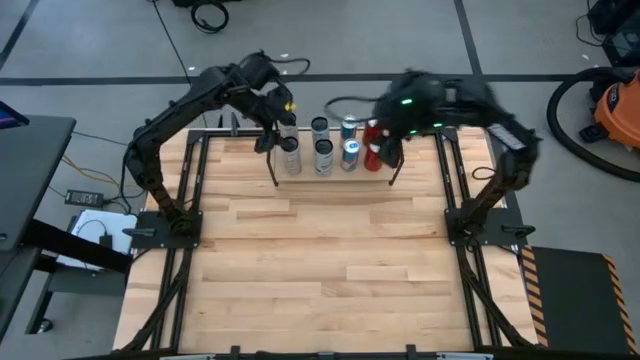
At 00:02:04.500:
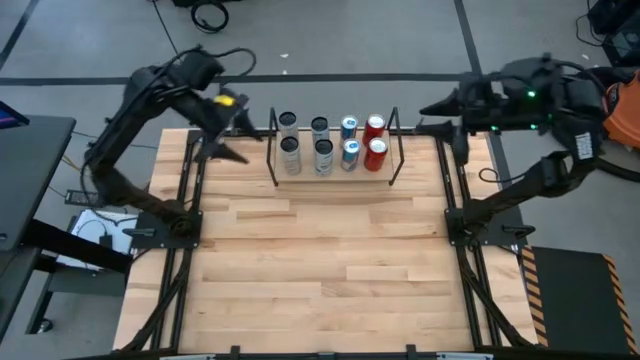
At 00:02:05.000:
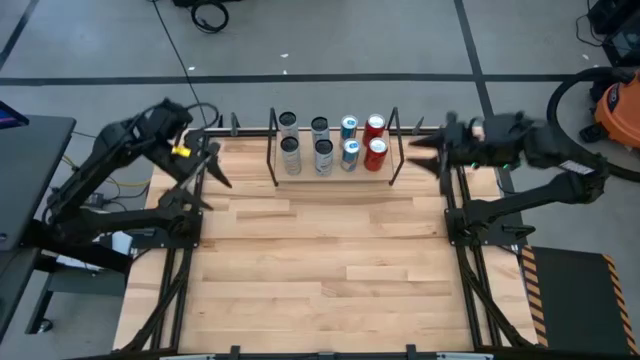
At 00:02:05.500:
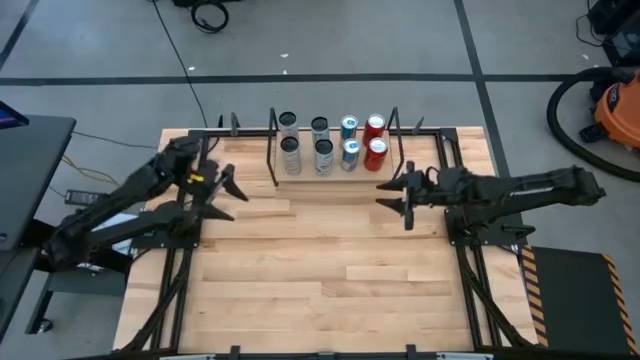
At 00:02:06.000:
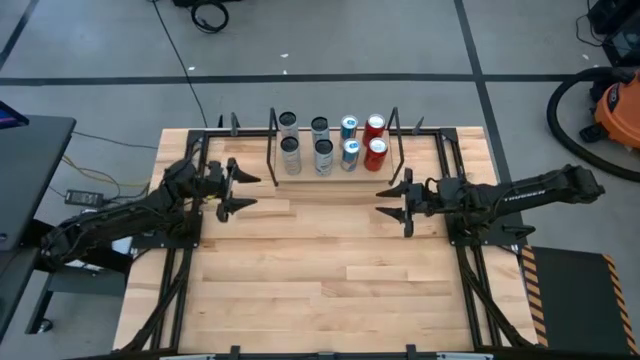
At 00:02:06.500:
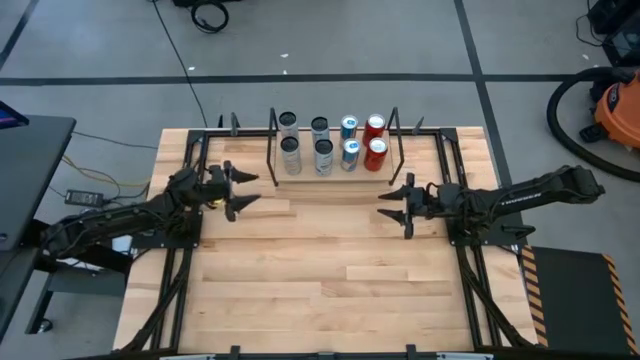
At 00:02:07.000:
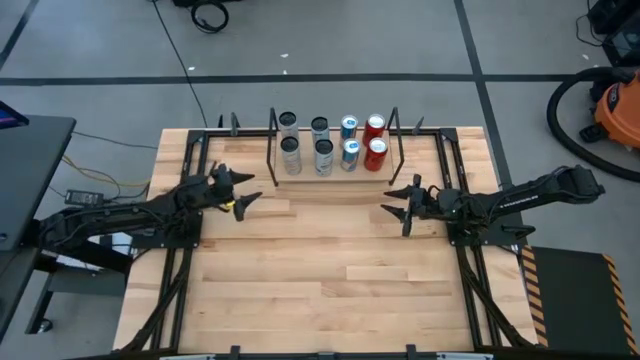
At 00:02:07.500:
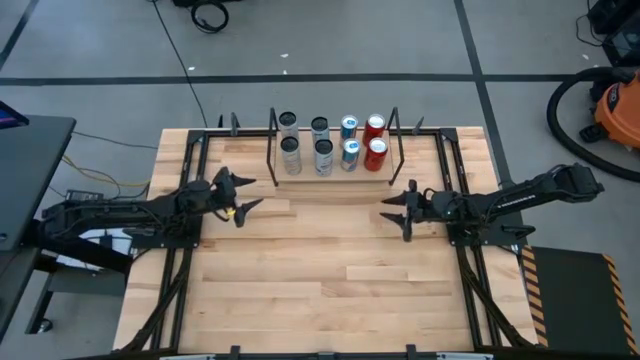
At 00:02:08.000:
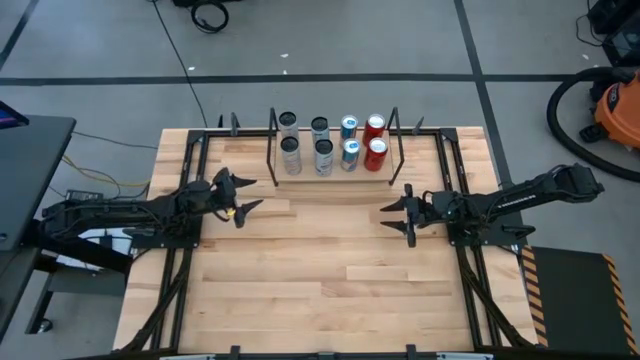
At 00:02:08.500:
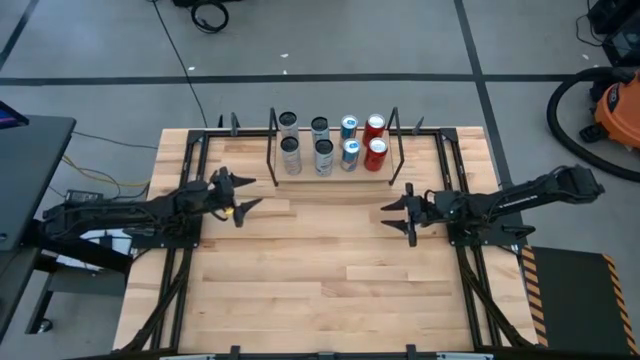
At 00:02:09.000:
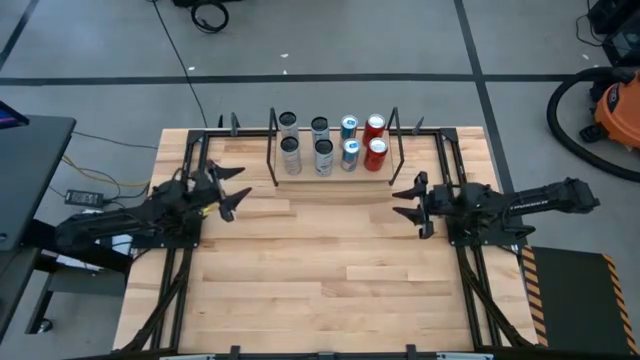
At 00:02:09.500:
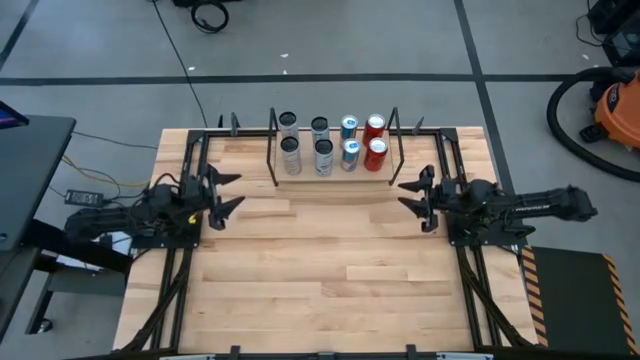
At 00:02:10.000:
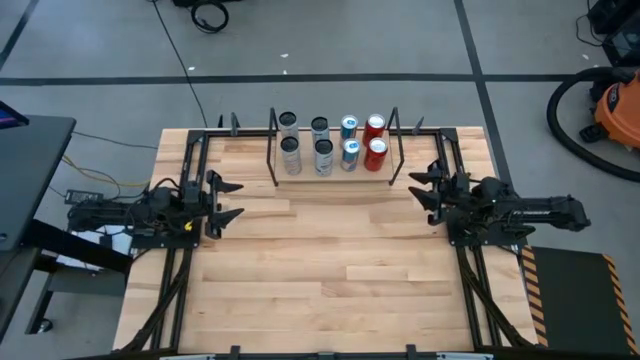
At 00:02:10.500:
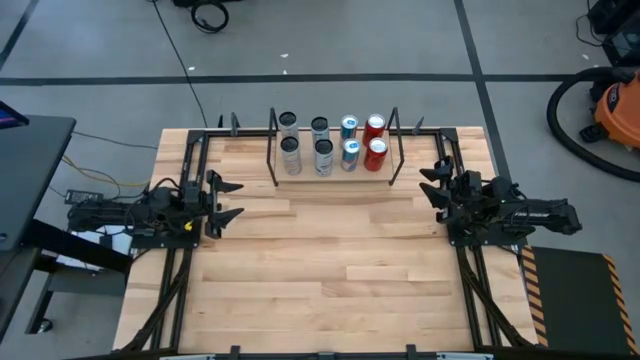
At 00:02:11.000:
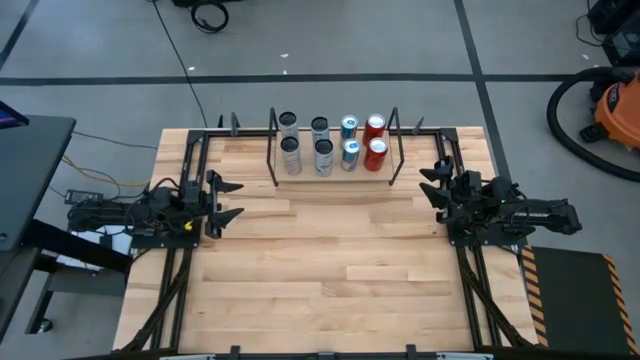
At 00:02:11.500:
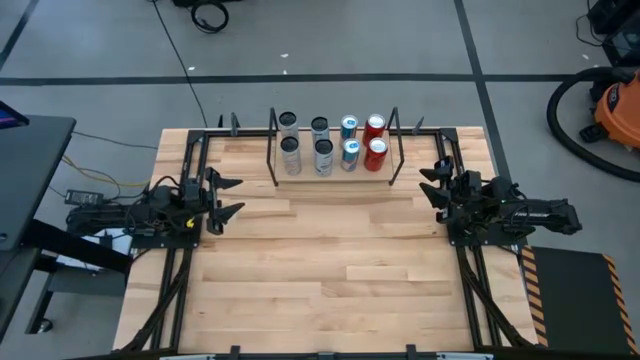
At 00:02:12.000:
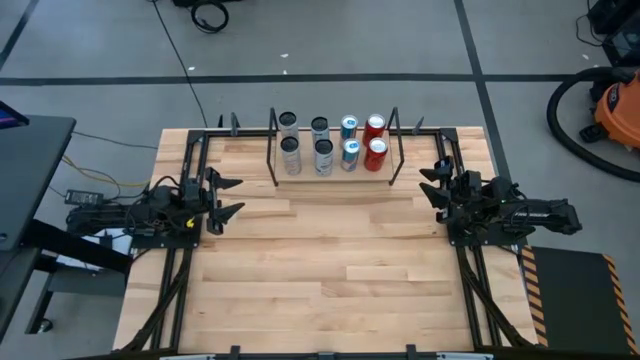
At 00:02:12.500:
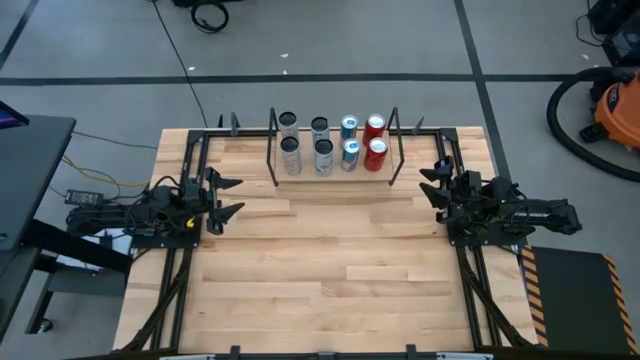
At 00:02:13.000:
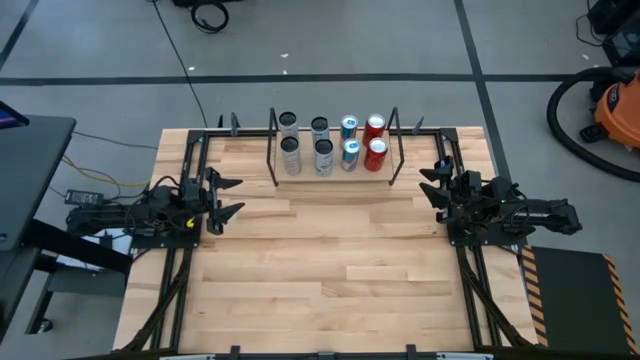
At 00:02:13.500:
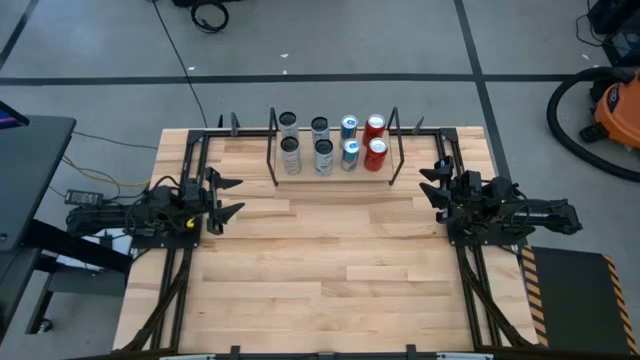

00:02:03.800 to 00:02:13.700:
Task: Place canned beverage on shelf
Return to Home Position

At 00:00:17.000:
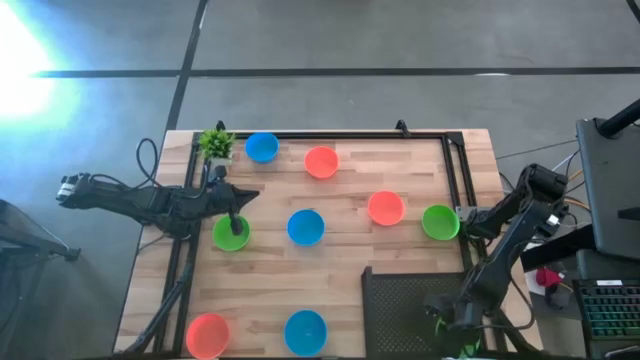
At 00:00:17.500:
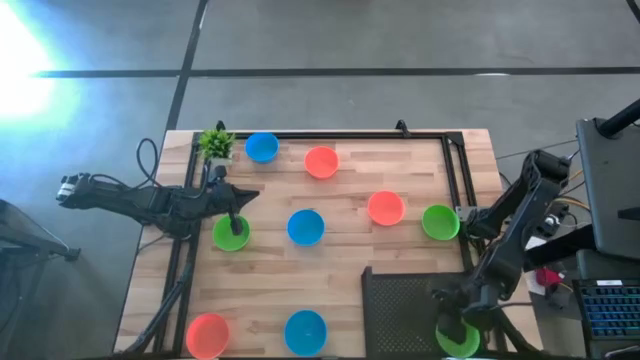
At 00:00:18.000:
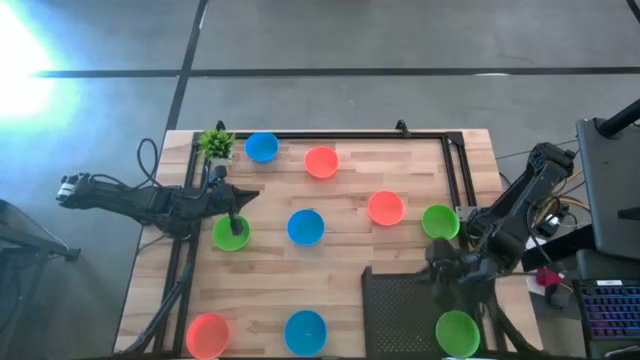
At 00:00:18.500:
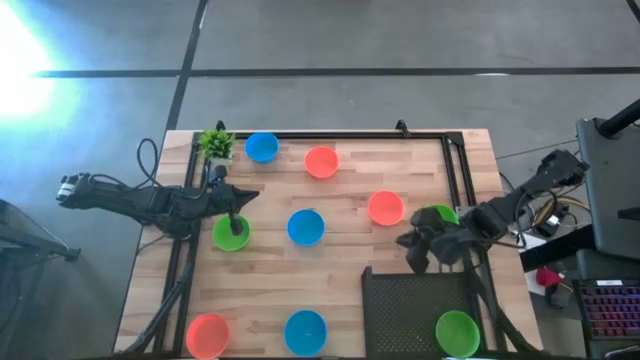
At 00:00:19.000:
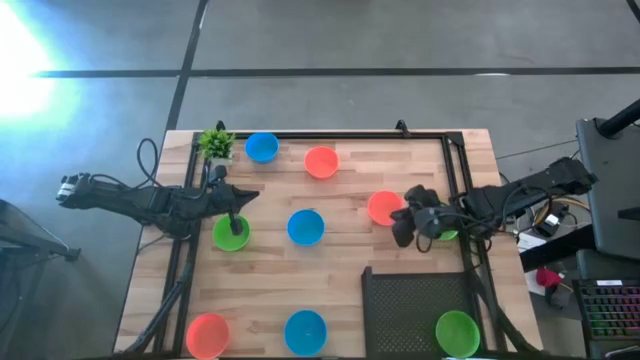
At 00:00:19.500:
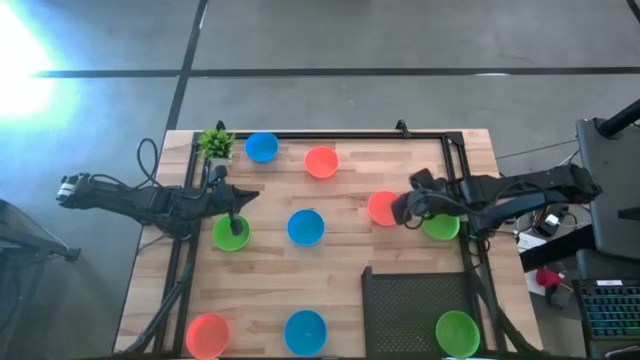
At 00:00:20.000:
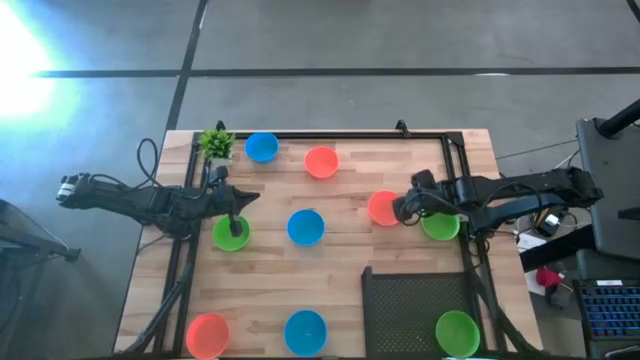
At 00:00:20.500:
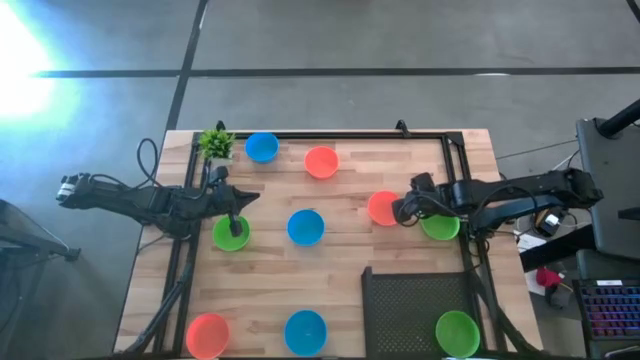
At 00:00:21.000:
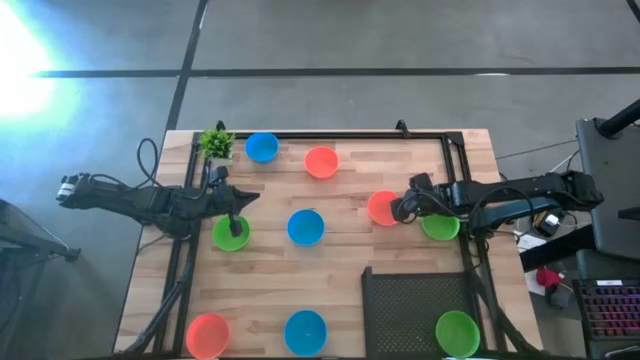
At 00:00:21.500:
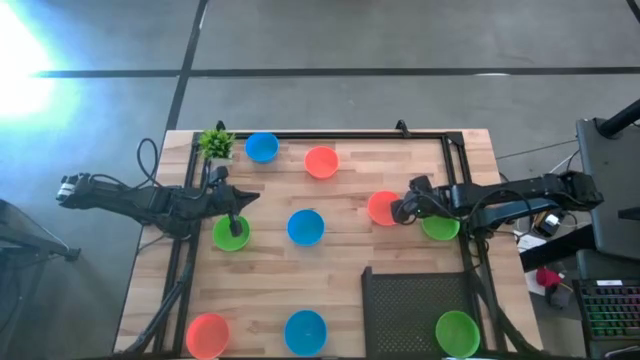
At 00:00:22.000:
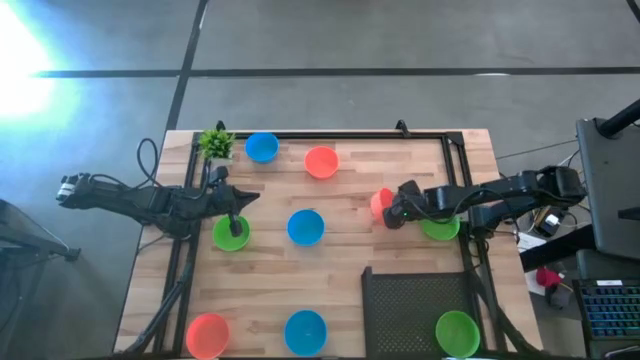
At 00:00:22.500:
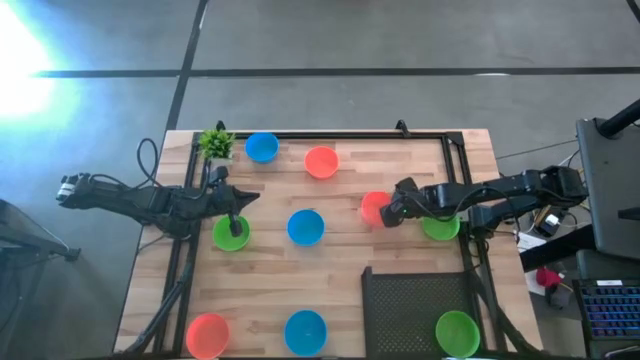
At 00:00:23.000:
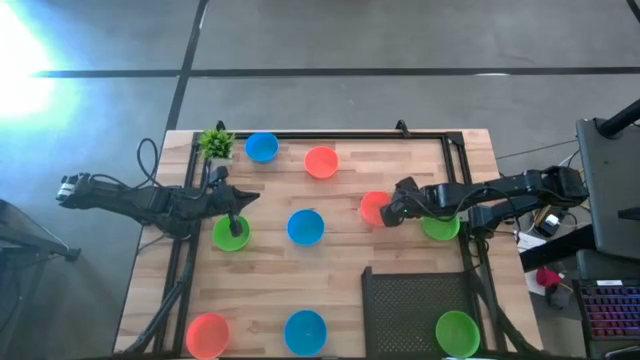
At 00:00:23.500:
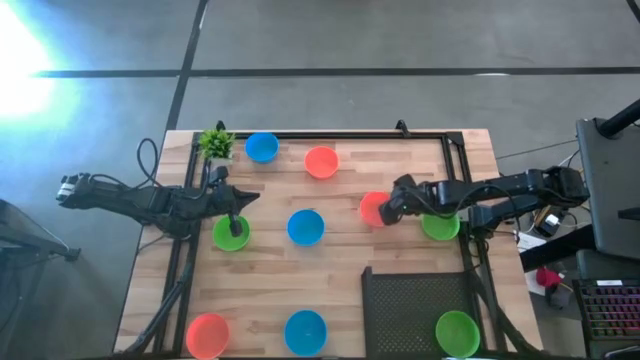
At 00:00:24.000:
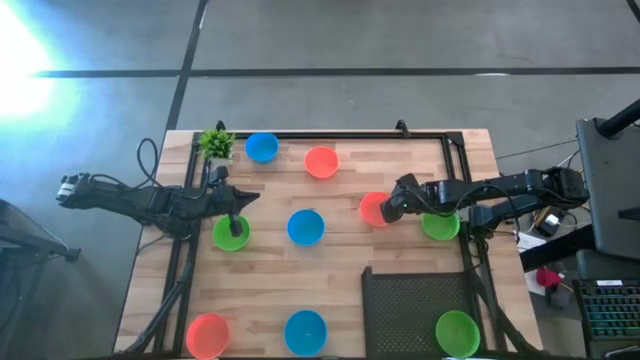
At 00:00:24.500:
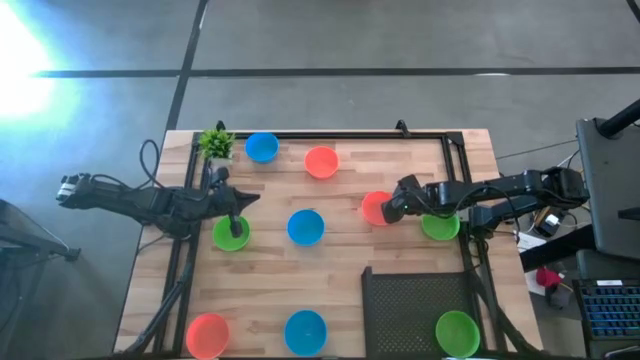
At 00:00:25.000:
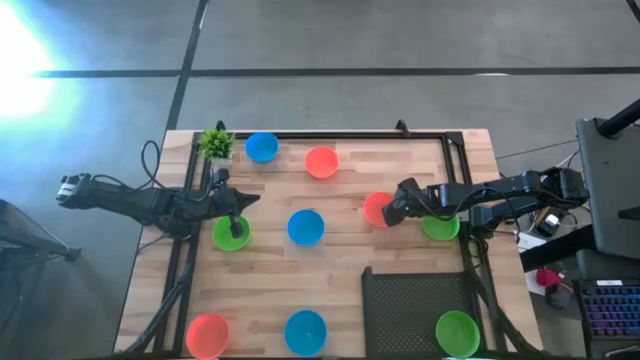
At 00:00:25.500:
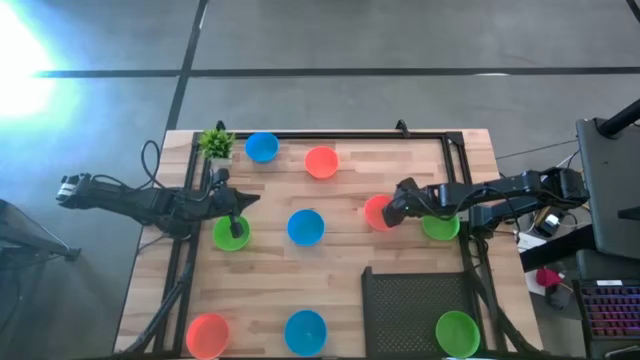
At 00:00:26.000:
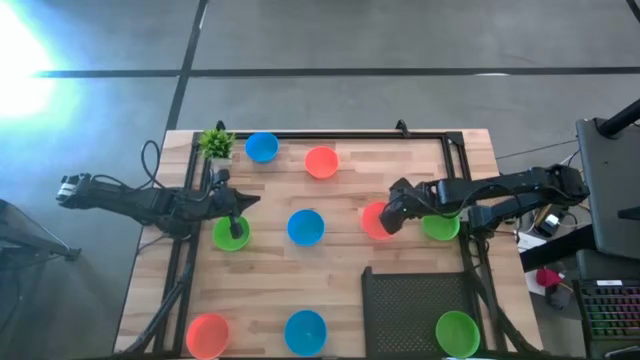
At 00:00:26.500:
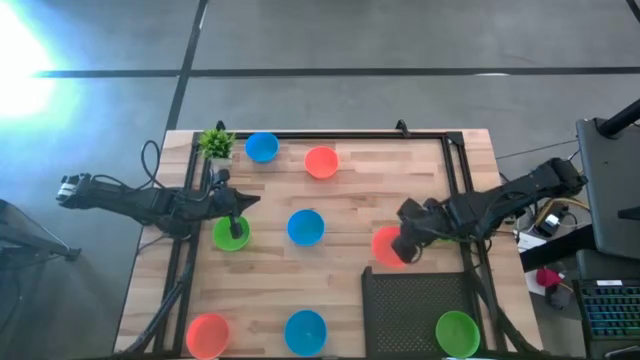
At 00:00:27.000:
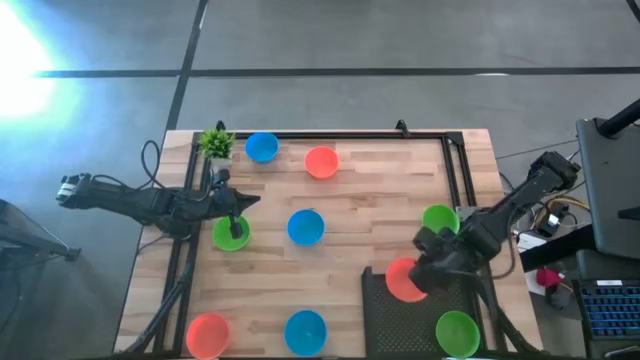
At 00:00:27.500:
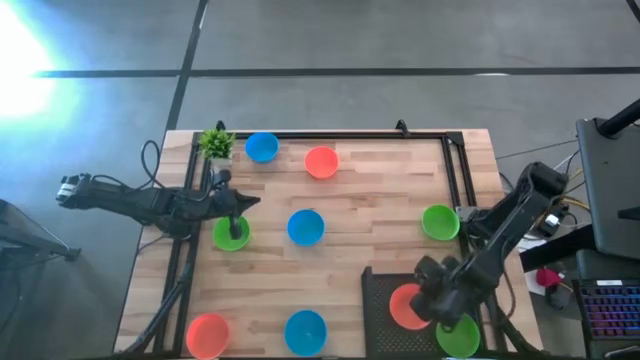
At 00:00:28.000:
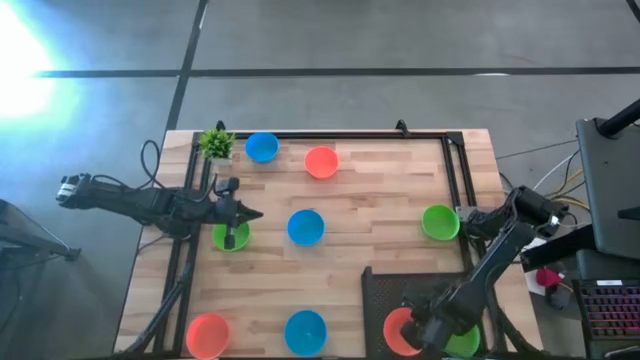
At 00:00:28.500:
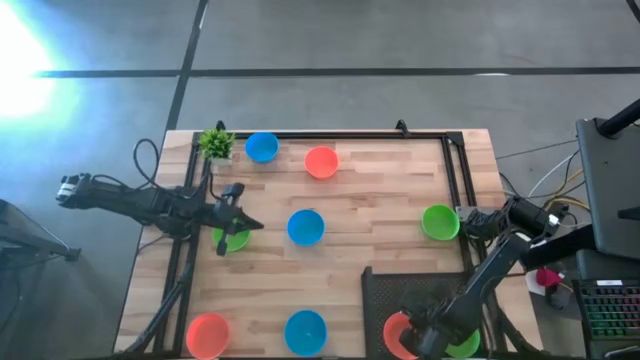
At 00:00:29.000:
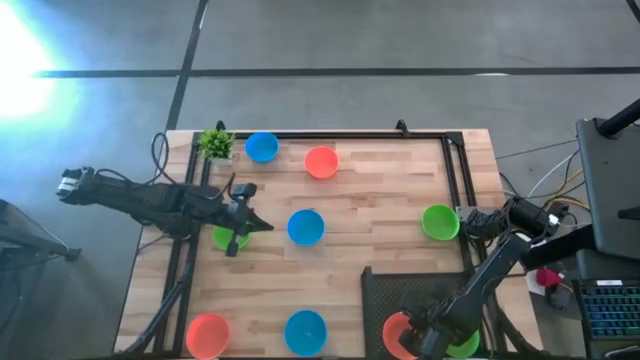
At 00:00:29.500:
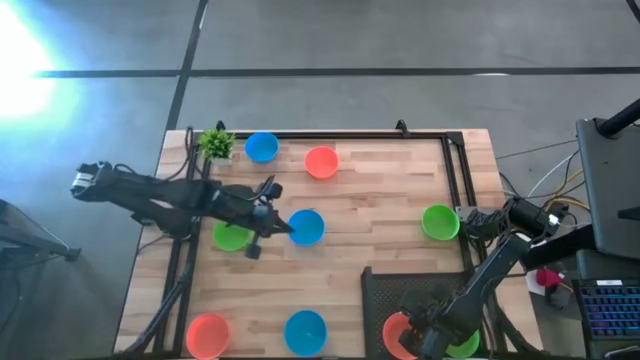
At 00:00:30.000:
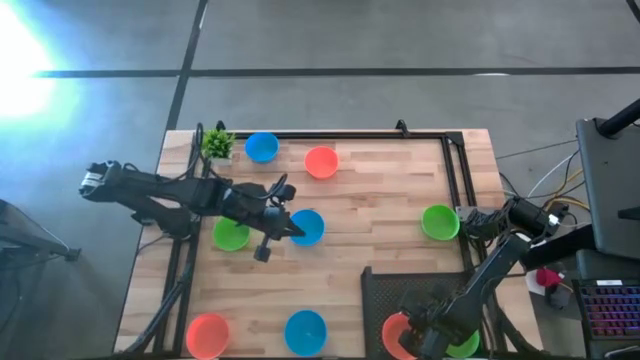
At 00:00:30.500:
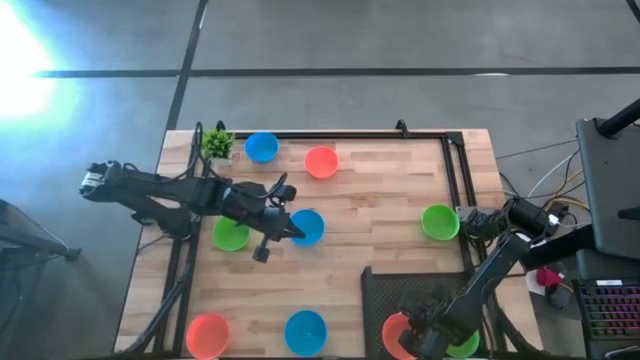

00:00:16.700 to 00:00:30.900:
Task: Pick & Place Mini bowls
Put the top right orange bowl on the shelf
